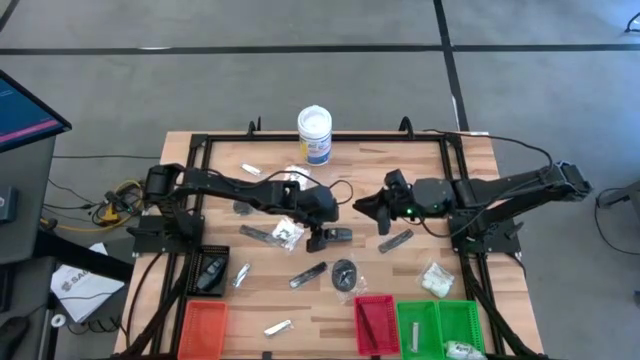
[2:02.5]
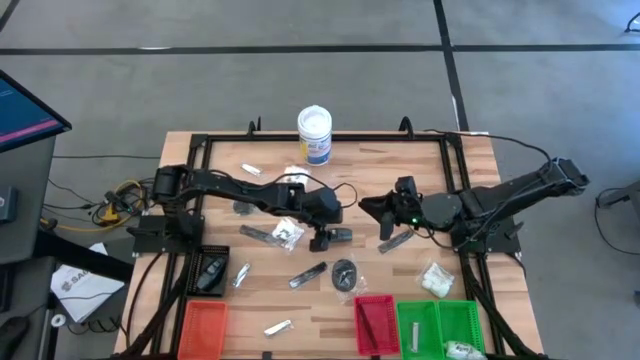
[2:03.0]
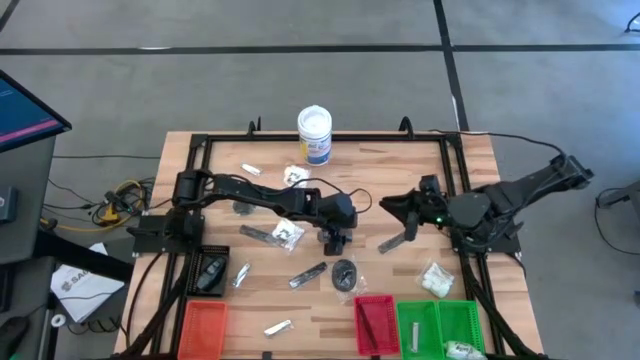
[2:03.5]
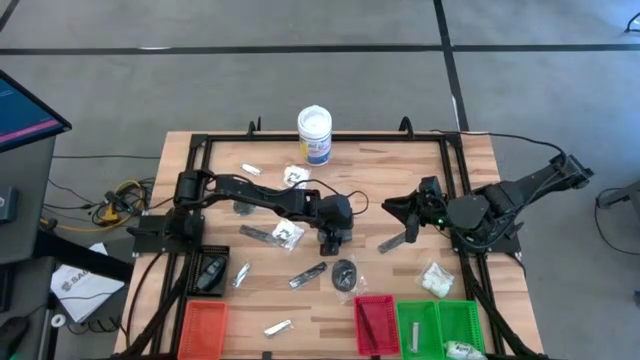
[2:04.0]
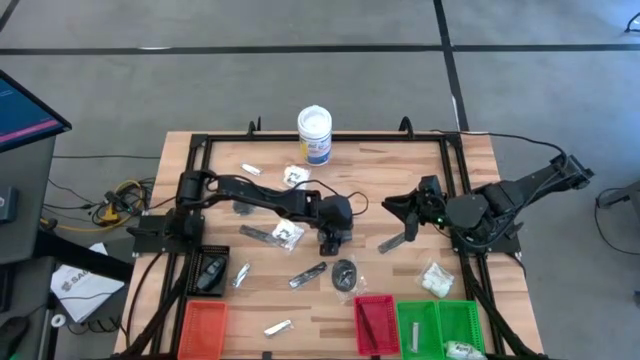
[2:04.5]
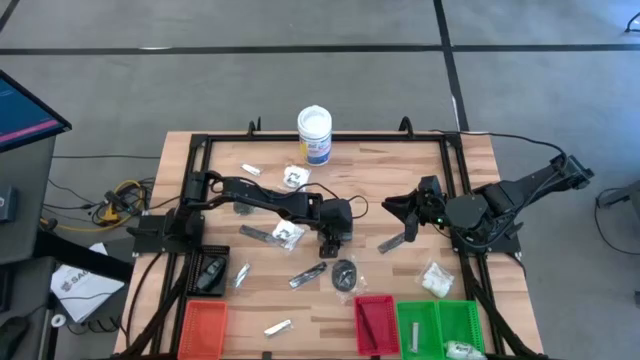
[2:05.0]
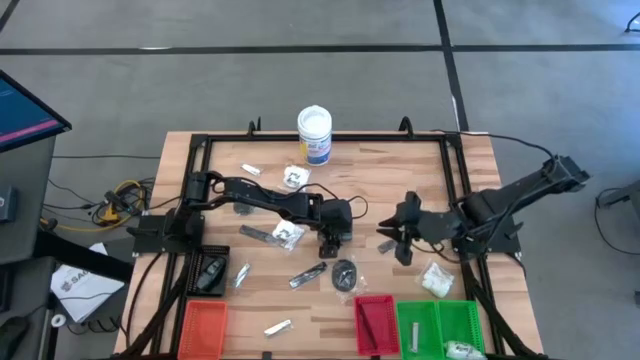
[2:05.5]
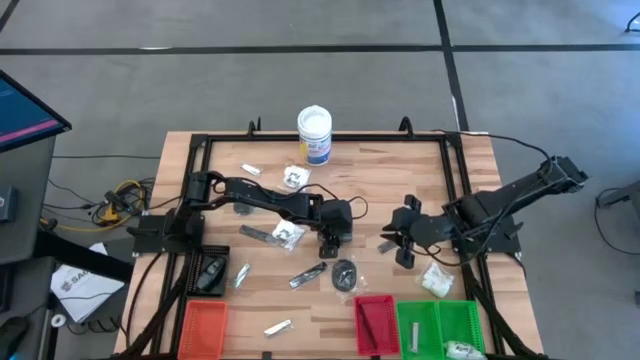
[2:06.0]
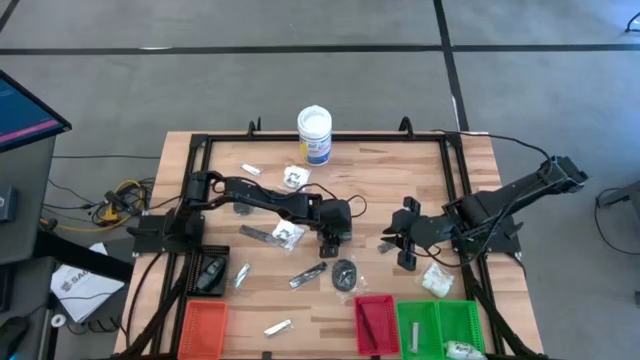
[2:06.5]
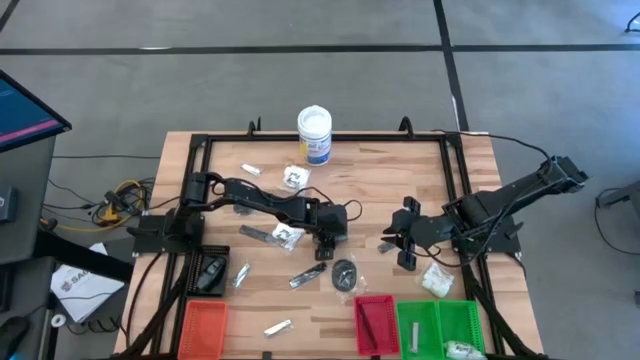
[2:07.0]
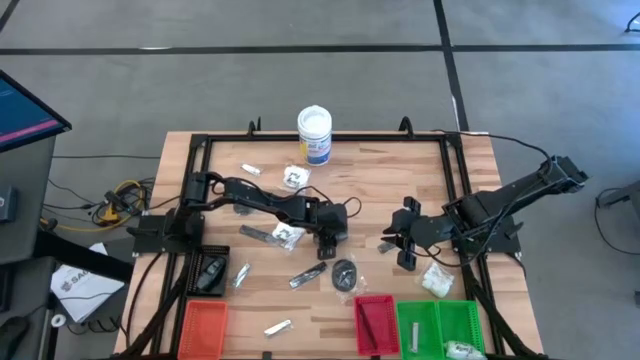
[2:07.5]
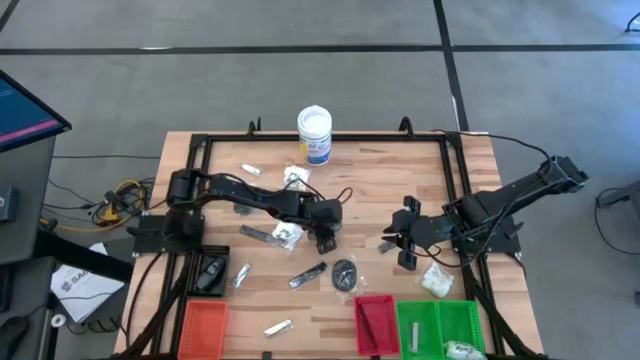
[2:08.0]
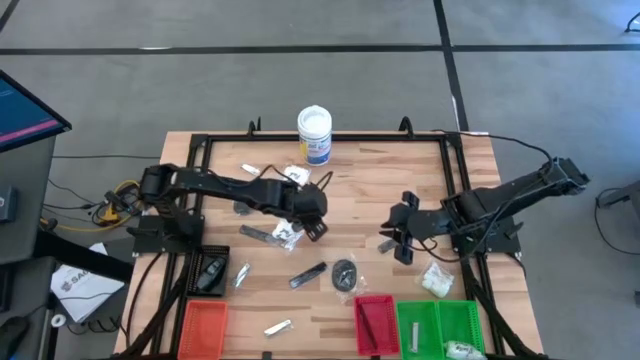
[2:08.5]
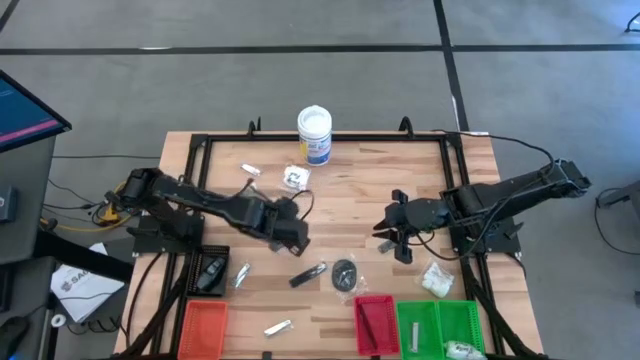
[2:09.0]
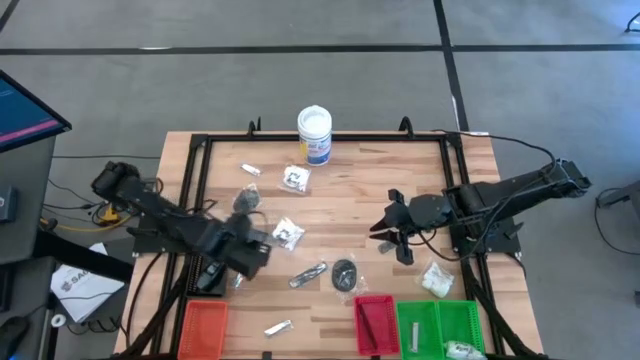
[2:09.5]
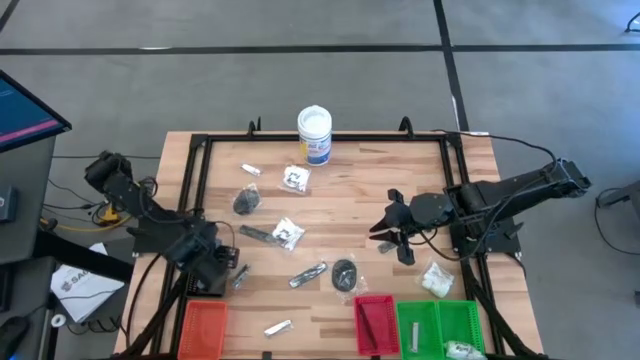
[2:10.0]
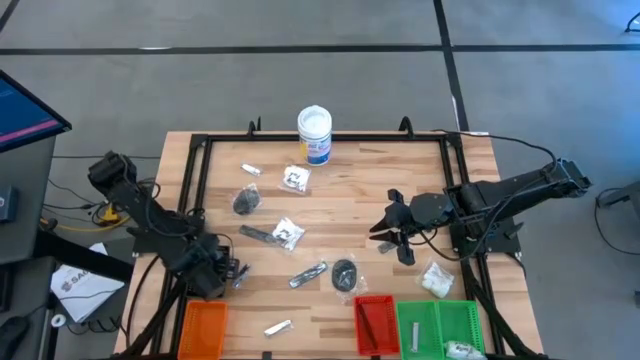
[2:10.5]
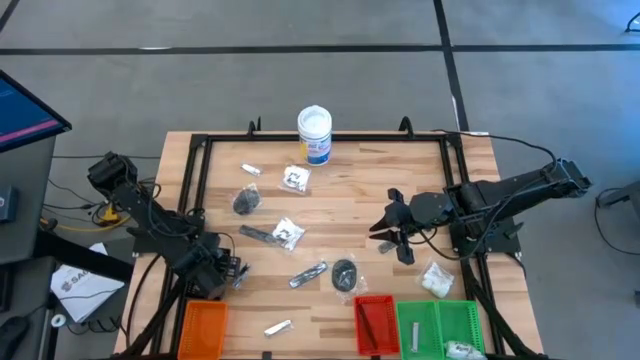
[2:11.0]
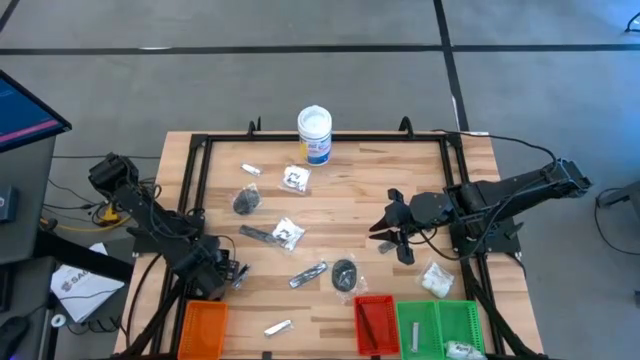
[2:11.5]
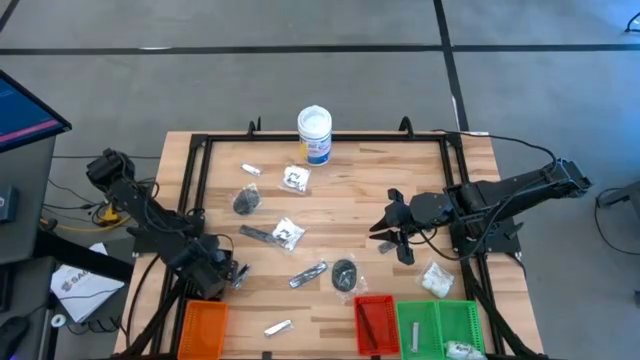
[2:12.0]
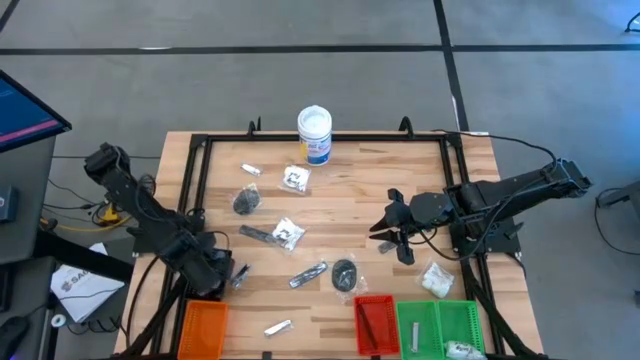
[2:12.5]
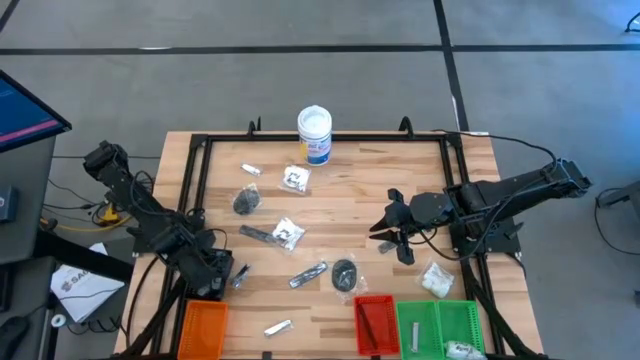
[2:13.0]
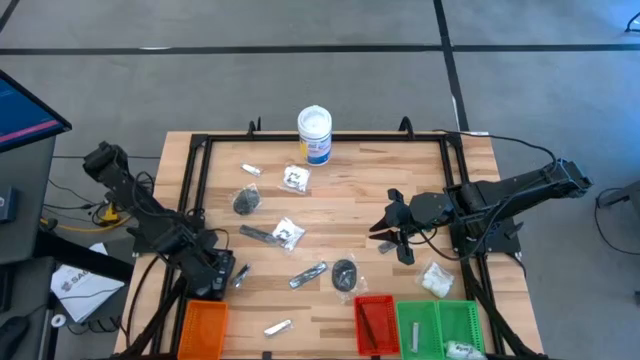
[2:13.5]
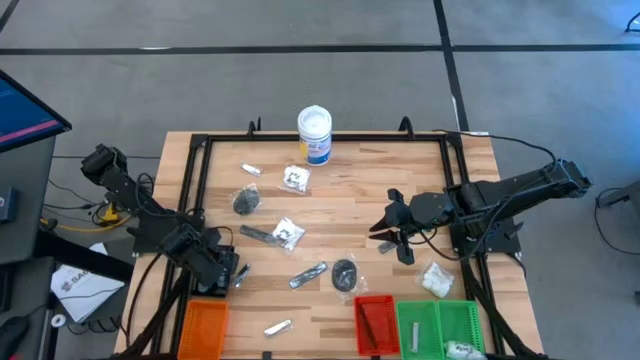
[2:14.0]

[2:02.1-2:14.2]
Task: Pick & Place Travel size toiletries
Put the gray deodorant into the black bin

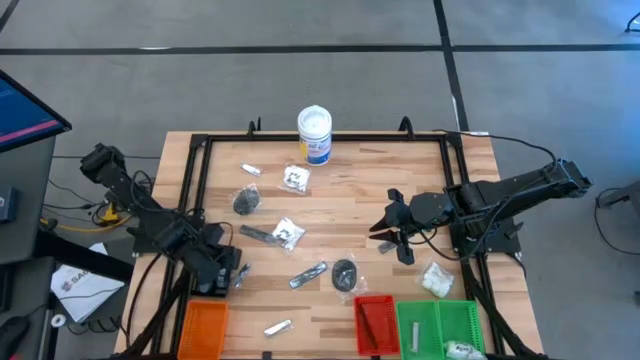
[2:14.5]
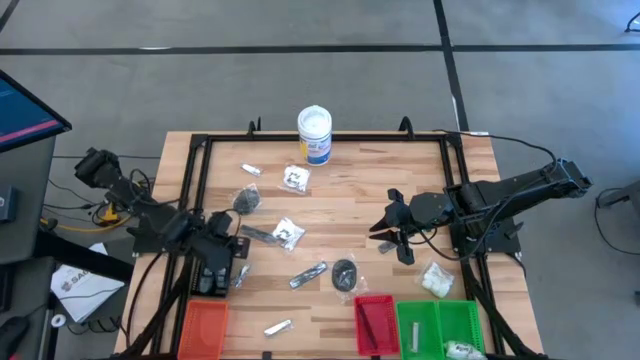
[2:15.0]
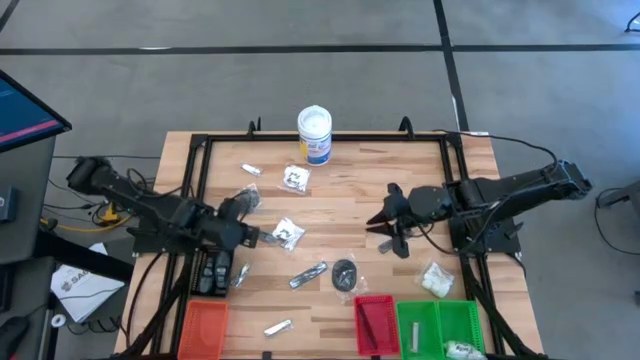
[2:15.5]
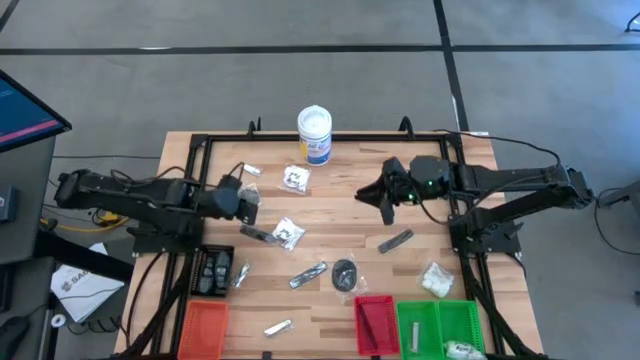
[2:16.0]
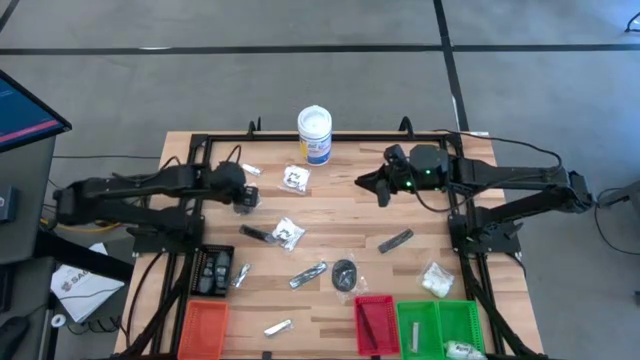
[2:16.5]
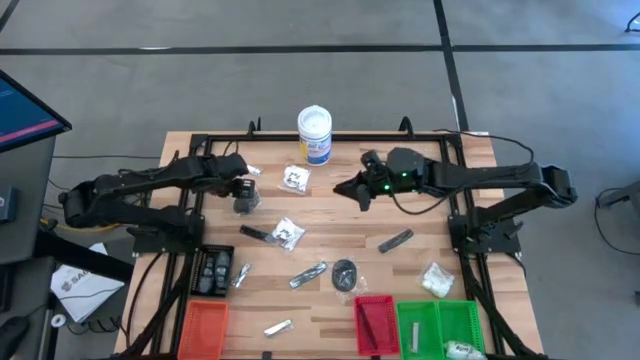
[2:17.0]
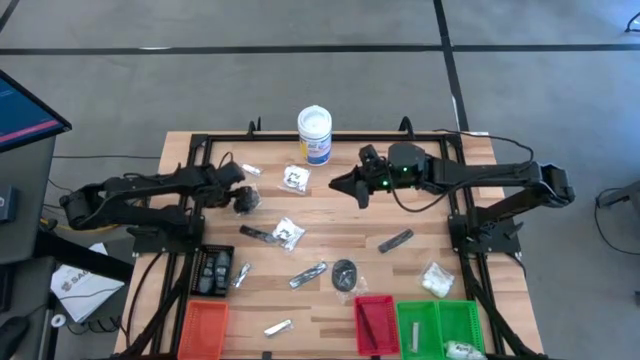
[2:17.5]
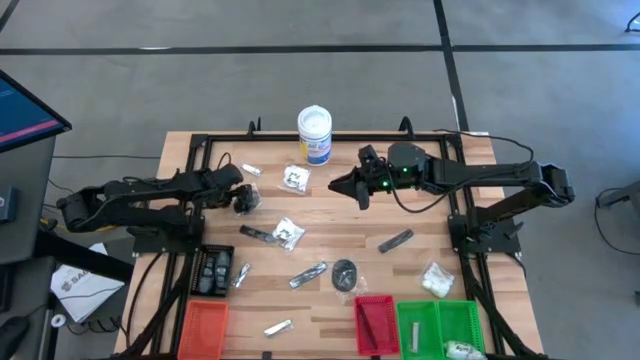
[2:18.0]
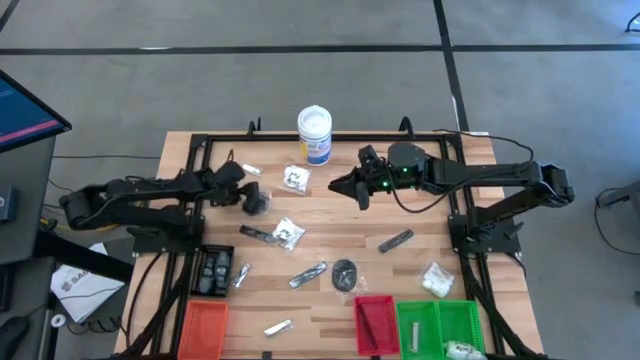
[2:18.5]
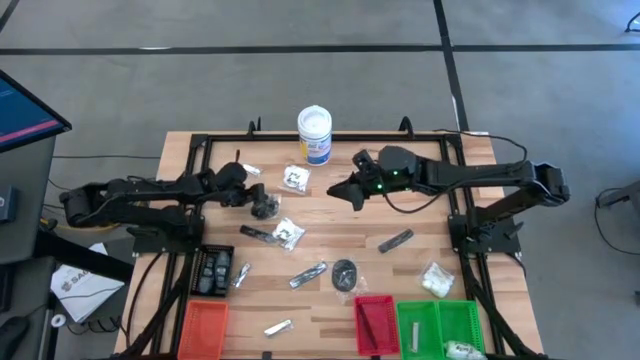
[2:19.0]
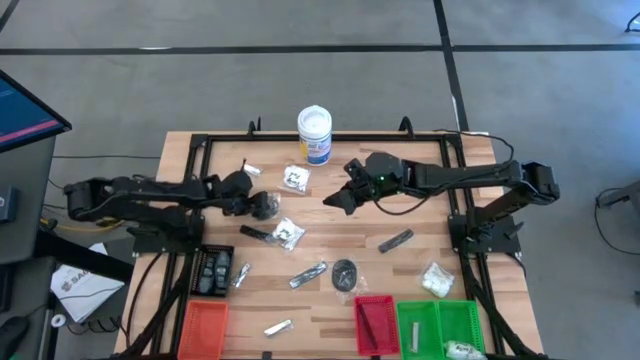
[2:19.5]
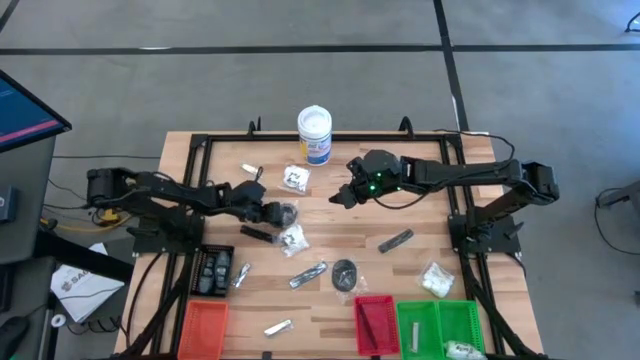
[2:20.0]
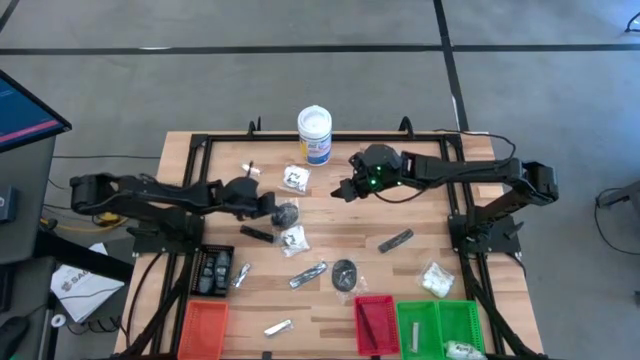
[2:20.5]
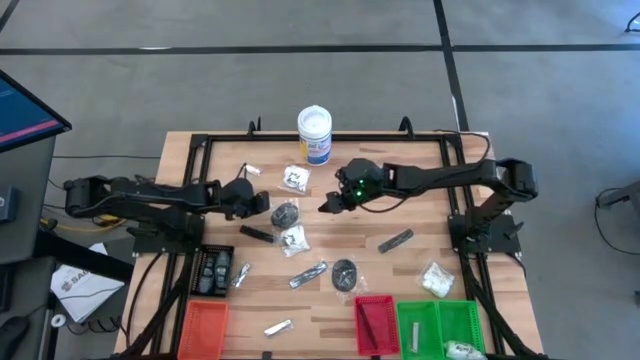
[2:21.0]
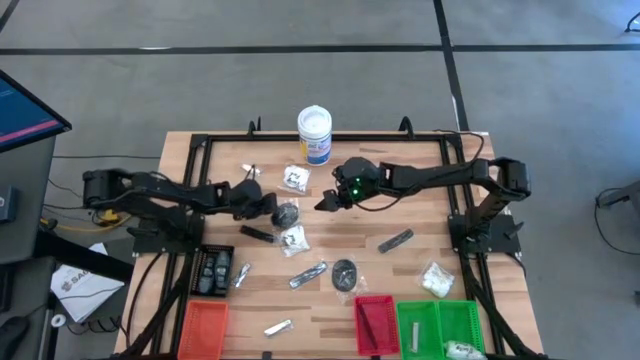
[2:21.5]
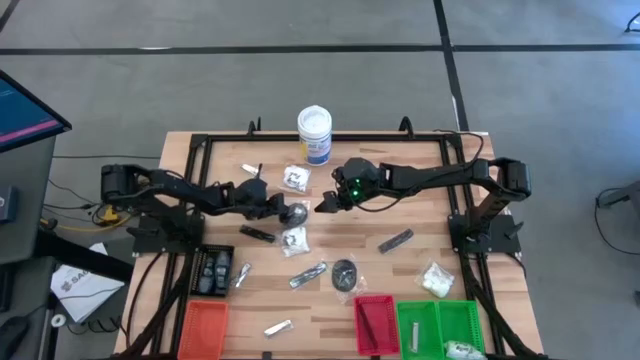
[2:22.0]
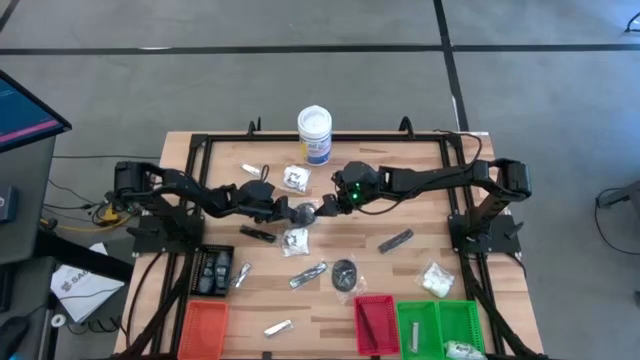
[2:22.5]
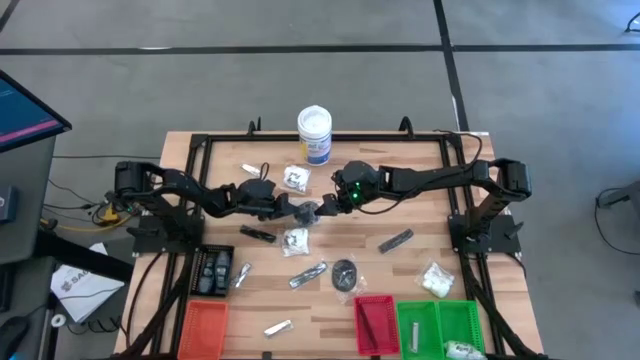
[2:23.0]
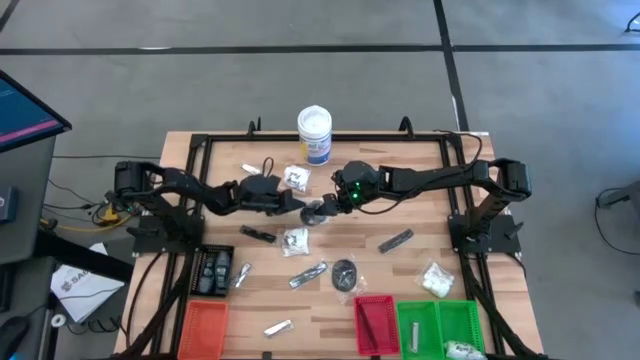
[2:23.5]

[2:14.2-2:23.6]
Put the black hairbrush into the orange bin
